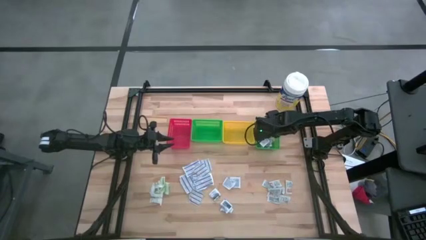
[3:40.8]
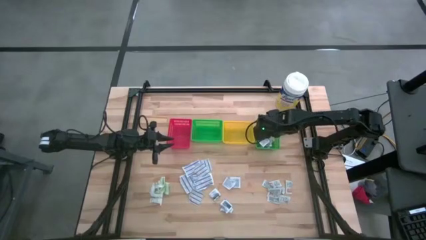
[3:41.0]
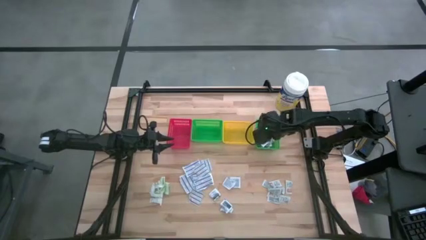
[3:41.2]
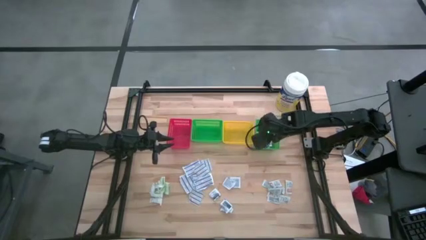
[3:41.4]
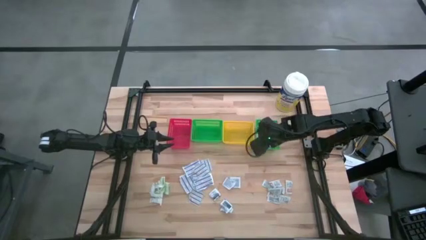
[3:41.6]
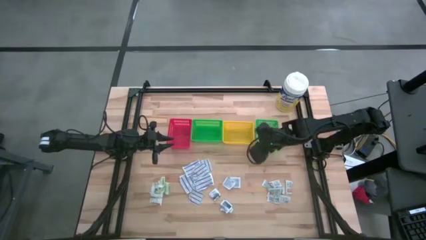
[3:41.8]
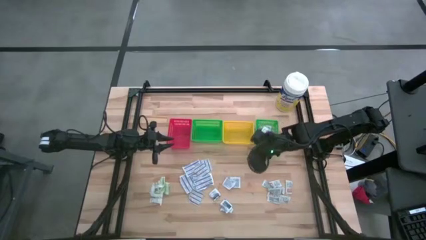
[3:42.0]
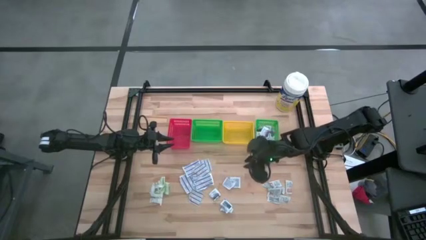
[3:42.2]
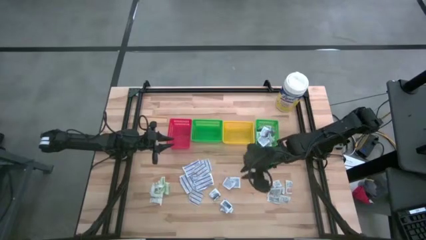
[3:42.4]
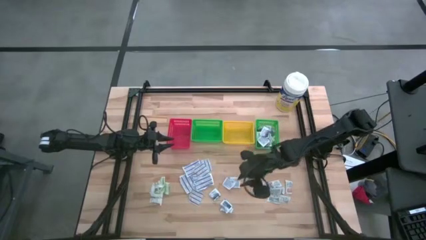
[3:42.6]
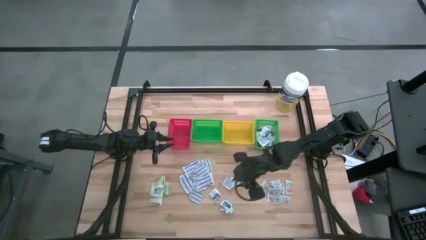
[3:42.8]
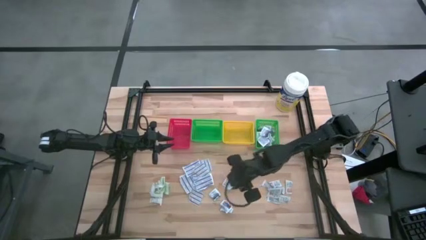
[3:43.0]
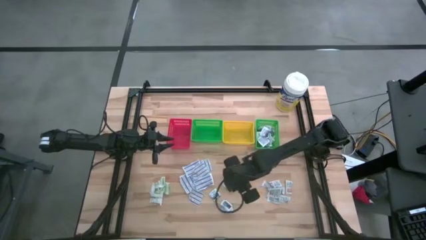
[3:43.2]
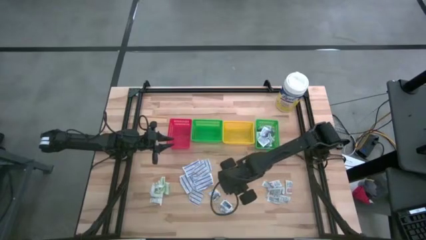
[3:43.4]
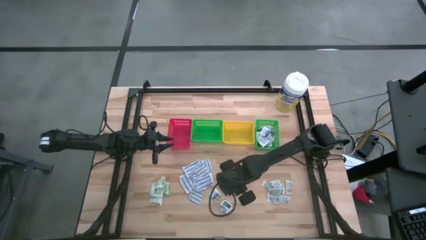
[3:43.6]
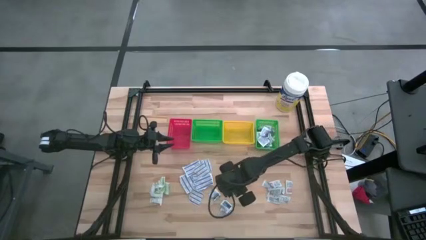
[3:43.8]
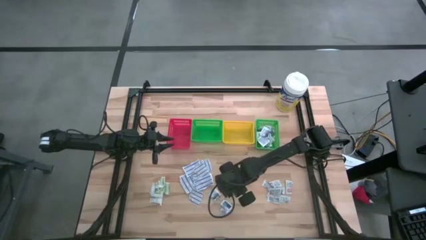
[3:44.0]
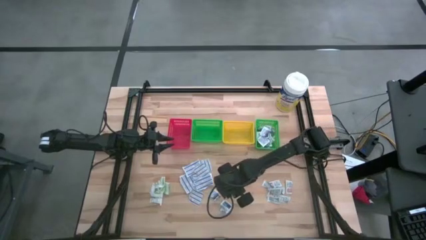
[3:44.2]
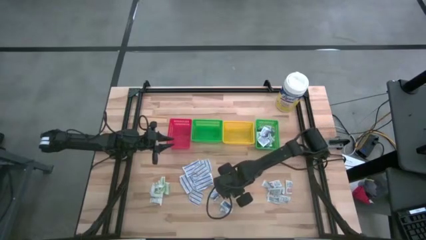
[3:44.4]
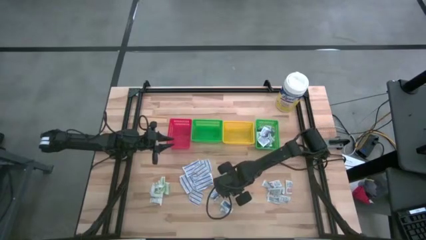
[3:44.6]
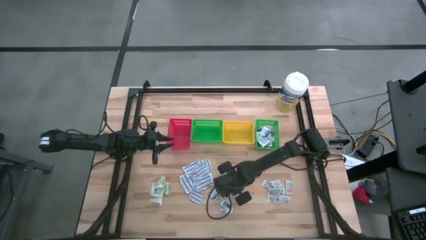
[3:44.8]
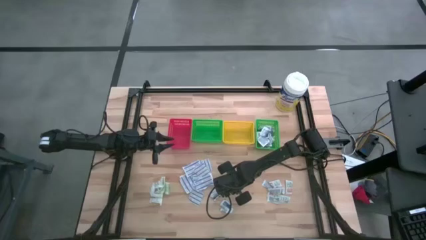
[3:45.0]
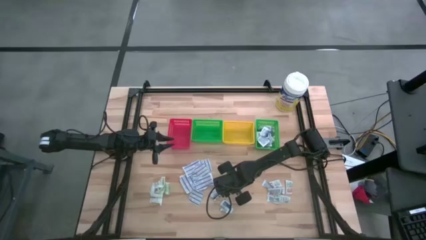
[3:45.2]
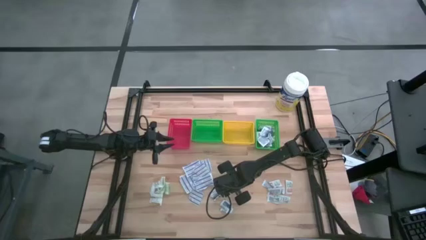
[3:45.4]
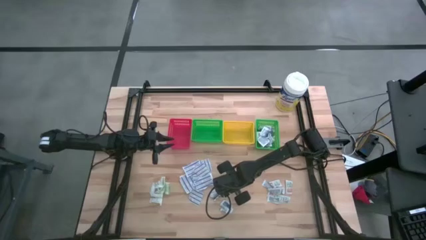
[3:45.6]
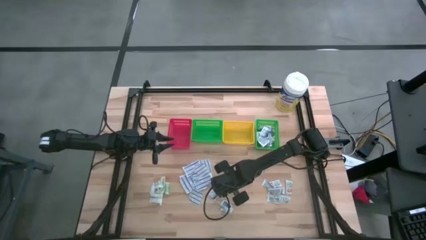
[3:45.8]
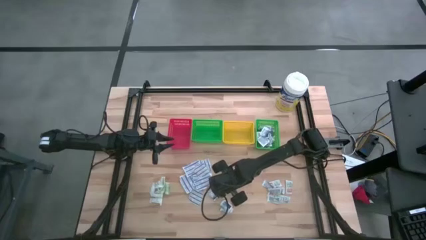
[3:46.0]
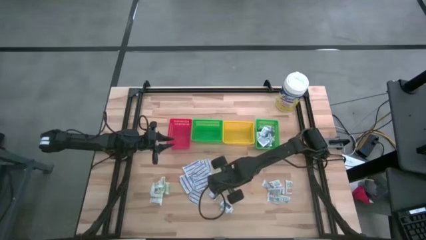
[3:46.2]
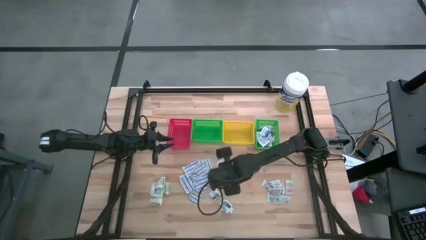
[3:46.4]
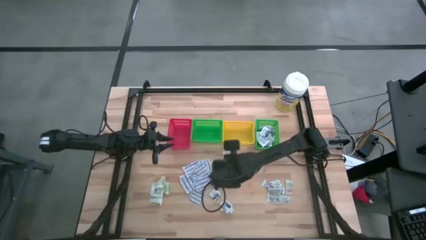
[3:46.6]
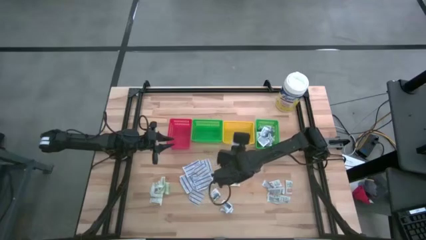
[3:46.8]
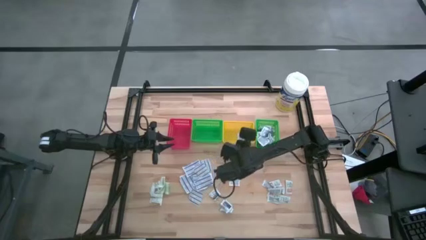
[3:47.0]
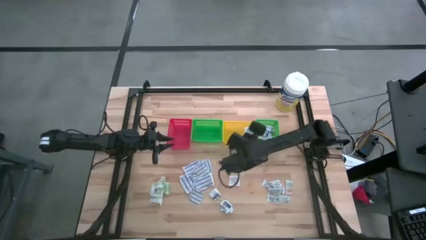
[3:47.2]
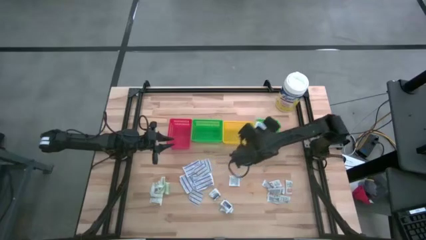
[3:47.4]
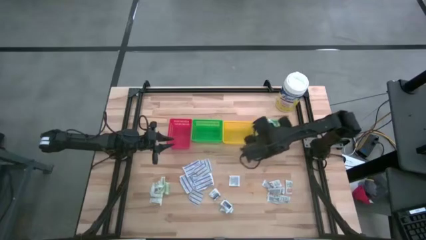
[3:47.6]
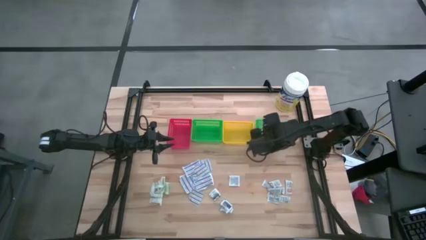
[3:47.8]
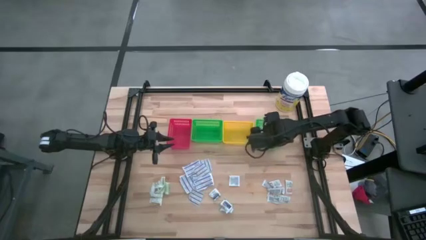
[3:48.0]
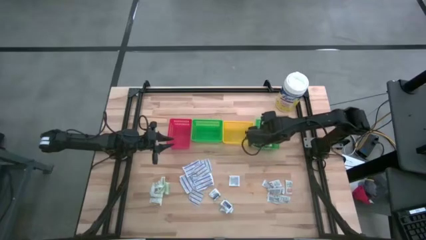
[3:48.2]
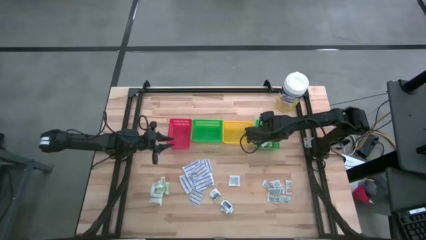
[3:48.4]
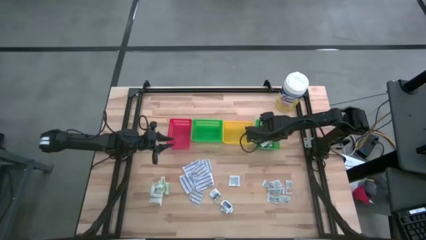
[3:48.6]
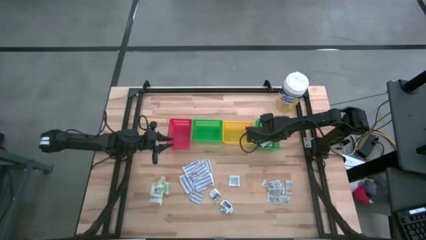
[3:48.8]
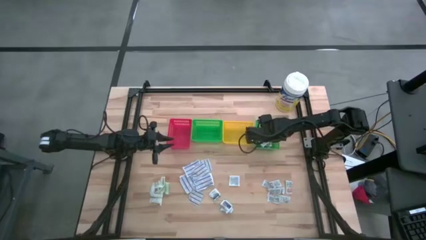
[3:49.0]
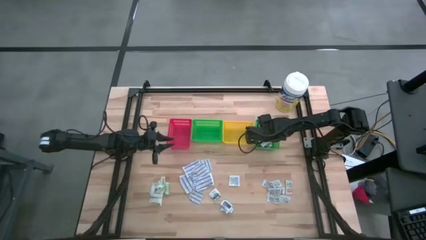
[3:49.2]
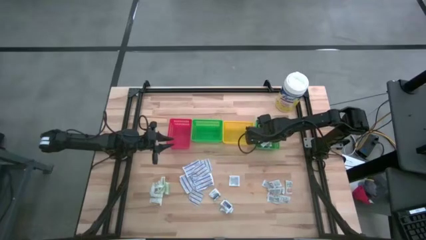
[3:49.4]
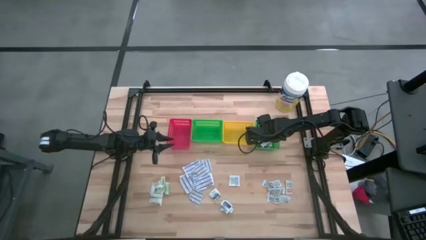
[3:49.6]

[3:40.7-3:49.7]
Task: Pick & Place First Aid Supplies
Put the blue alcohol pad into the right green bin

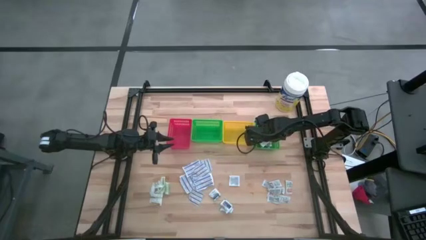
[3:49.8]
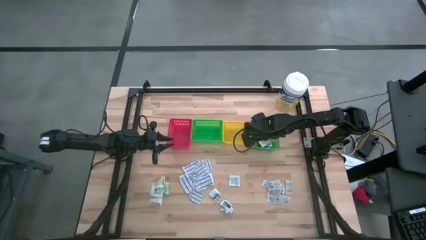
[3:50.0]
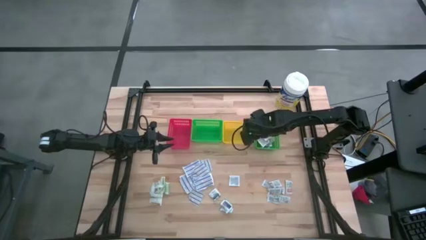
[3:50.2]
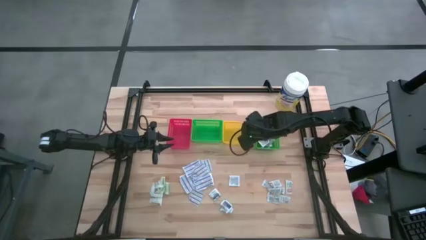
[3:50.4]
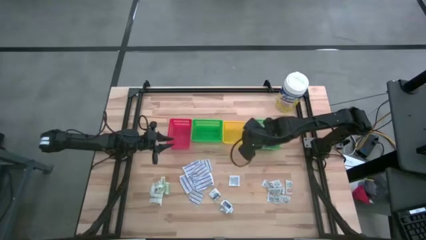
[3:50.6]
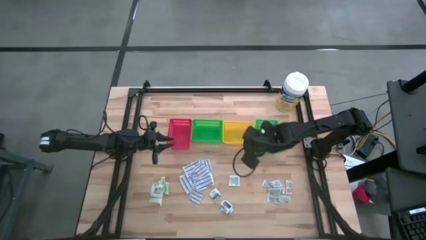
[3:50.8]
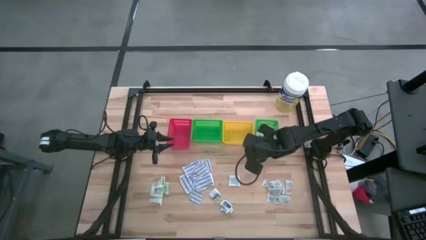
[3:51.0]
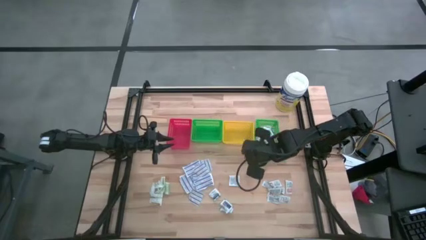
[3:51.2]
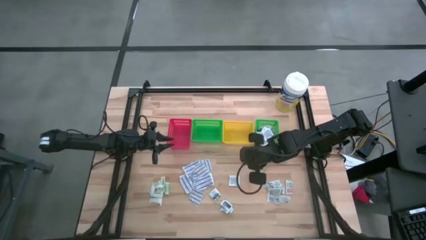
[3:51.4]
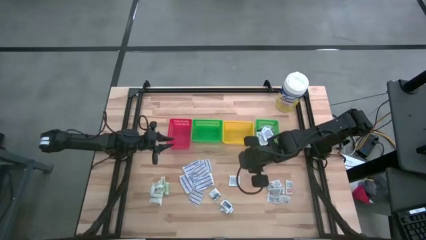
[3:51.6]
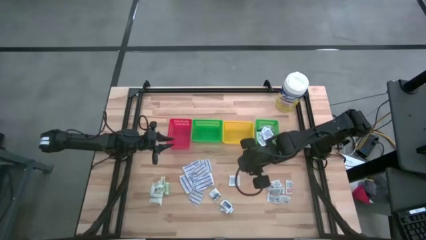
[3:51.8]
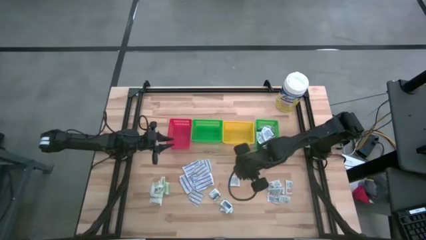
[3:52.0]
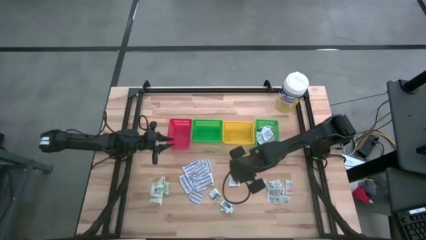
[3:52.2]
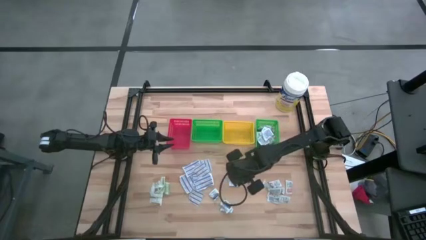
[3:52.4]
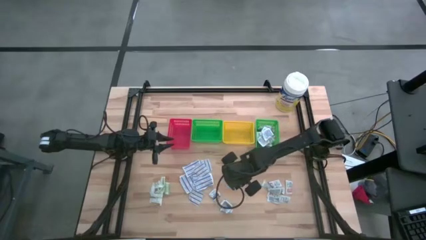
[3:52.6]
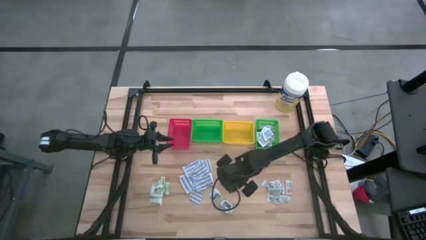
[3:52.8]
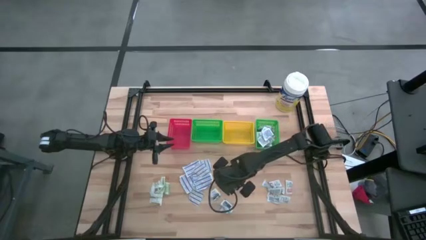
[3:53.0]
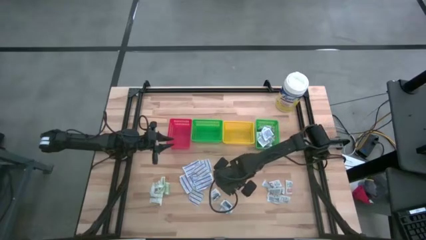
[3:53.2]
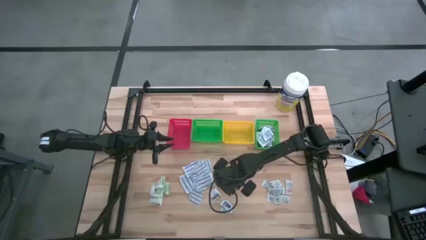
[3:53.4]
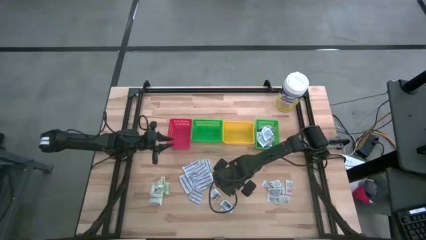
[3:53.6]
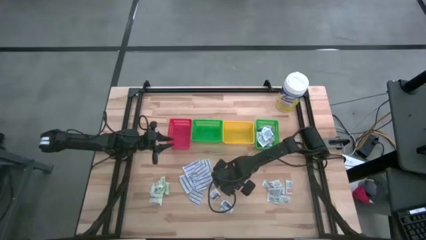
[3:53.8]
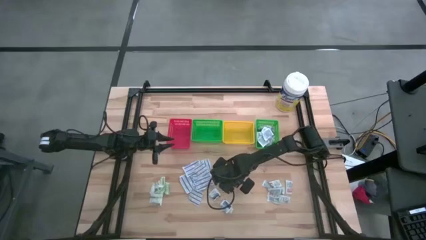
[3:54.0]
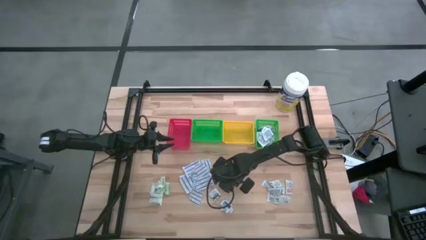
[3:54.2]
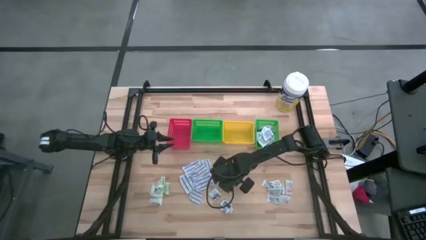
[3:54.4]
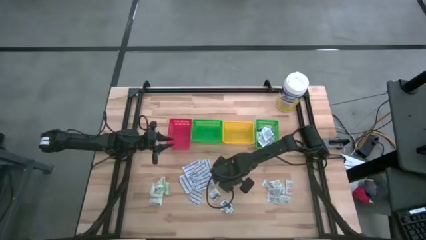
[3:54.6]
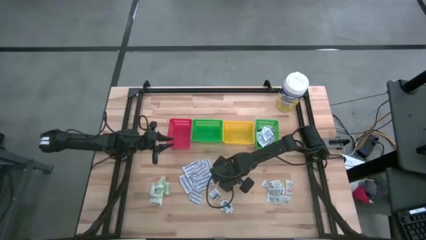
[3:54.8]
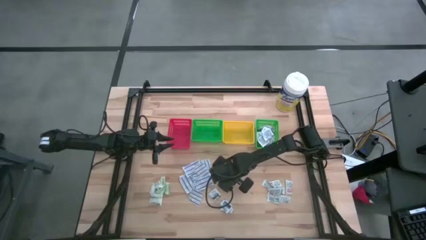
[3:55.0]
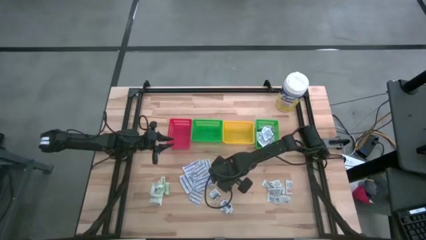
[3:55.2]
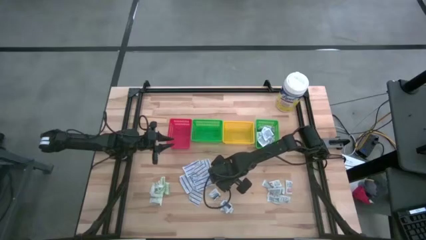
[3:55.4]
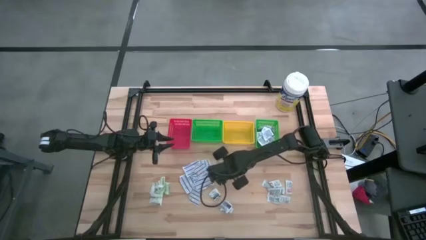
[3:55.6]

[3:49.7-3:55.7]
Put the blue alcohol pad into the right green bin

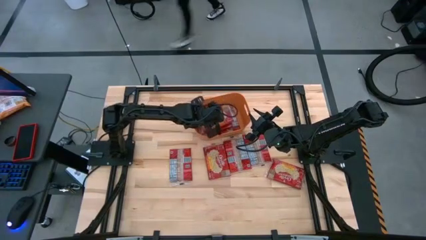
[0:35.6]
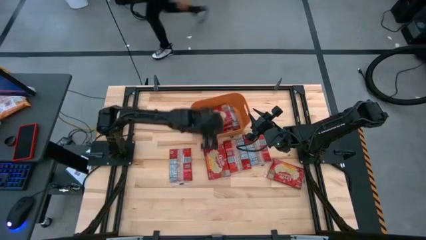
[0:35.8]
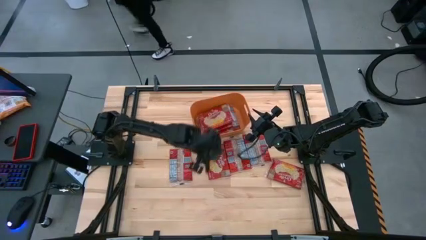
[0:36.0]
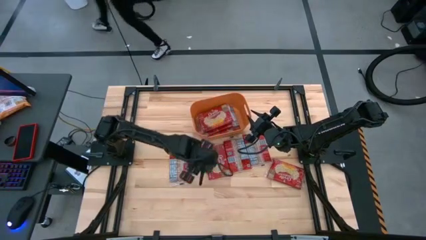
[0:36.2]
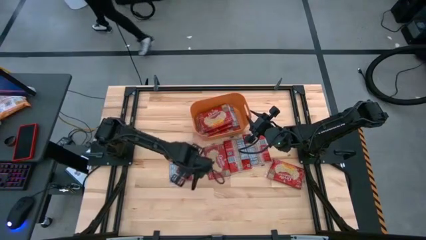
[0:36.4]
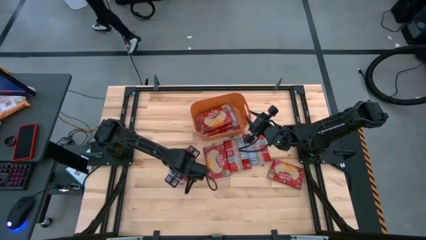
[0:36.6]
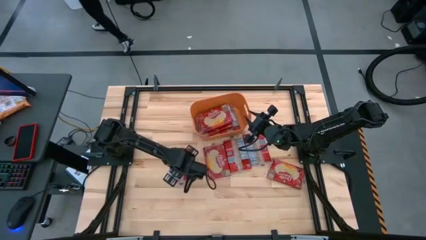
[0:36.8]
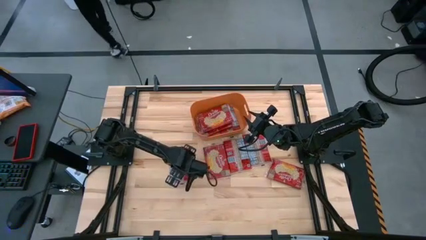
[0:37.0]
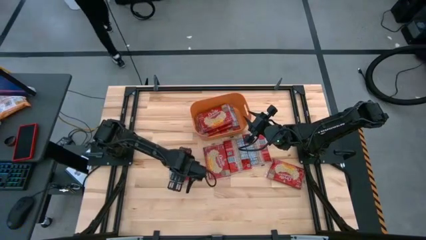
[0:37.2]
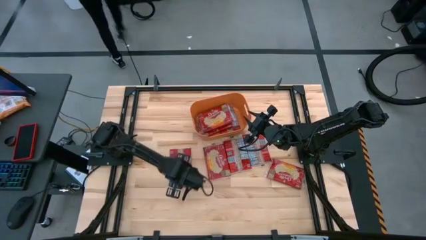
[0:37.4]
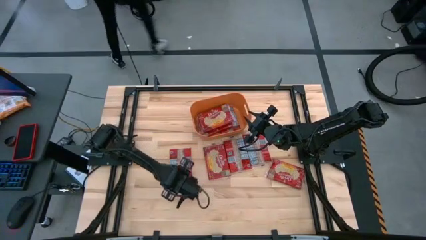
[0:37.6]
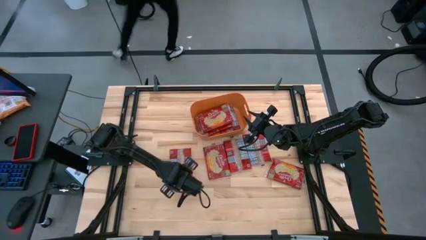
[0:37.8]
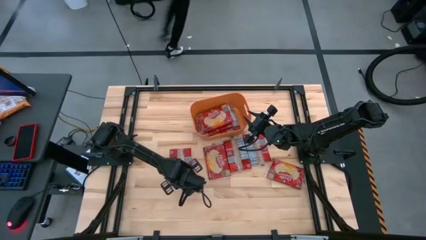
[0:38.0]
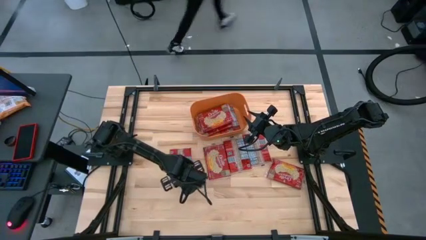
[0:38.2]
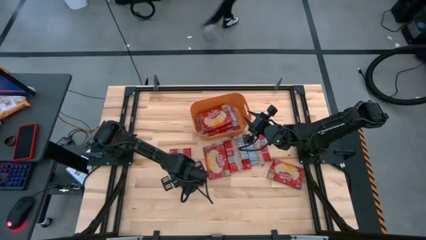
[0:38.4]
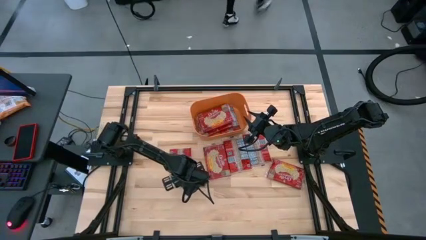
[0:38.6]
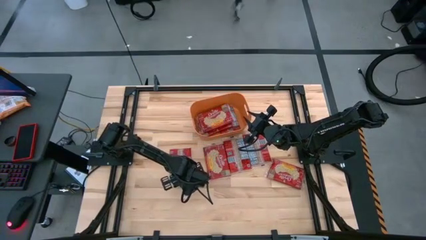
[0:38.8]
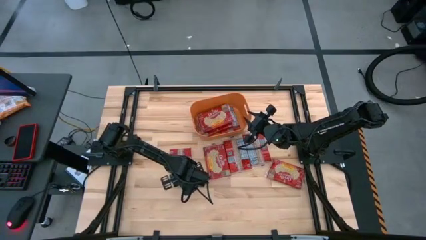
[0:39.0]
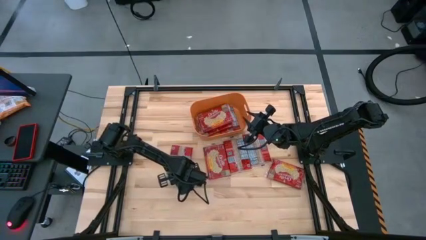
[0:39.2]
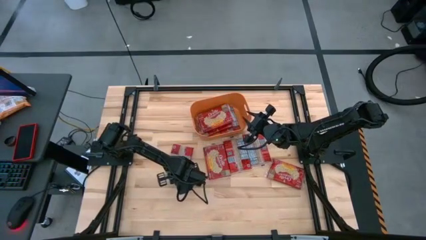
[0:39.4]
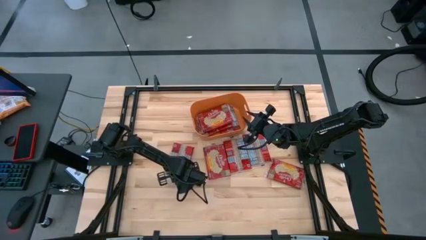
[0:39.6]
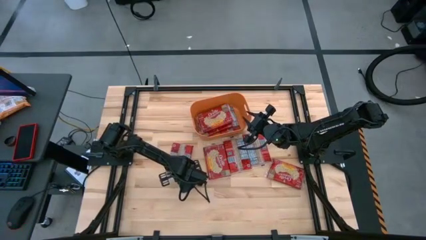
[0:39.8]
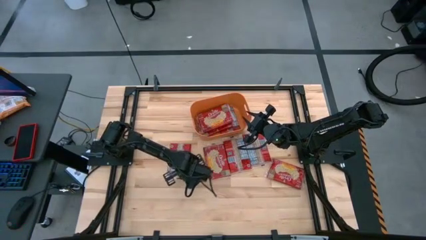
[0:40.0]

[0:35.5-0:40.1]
Task: Sort popcorn bags into baskets
Put the red popcorn bag into the orange bin
